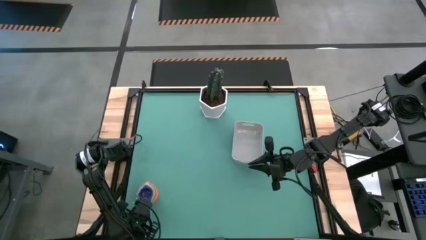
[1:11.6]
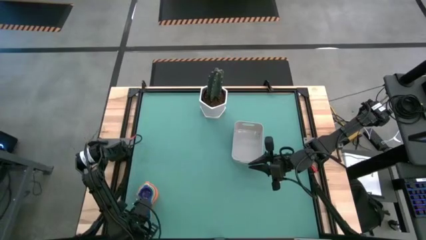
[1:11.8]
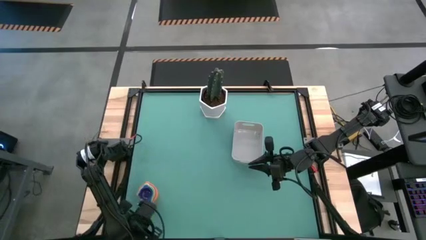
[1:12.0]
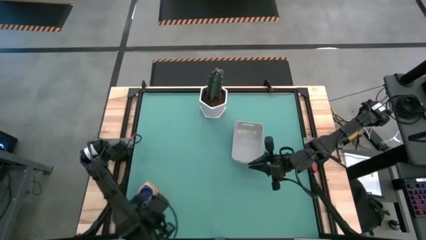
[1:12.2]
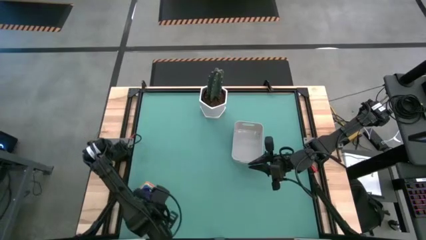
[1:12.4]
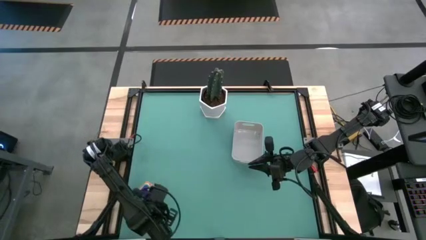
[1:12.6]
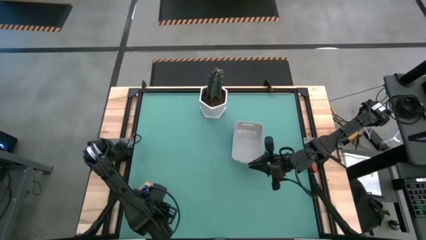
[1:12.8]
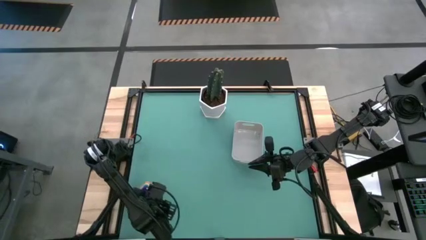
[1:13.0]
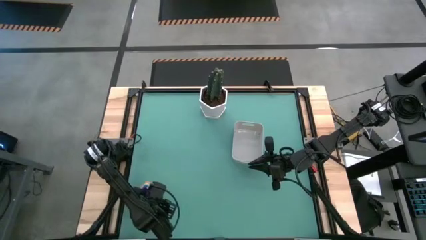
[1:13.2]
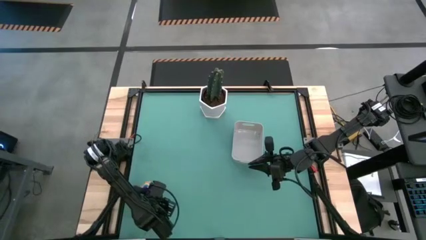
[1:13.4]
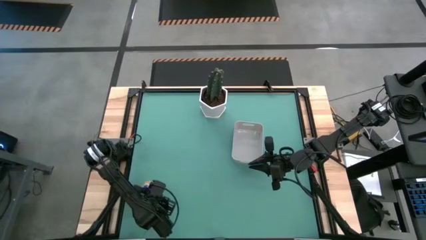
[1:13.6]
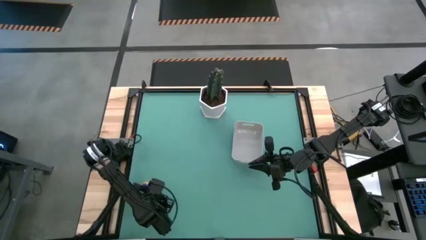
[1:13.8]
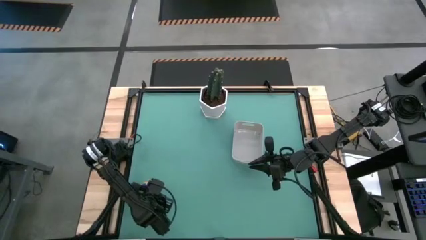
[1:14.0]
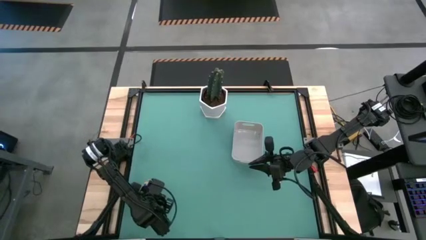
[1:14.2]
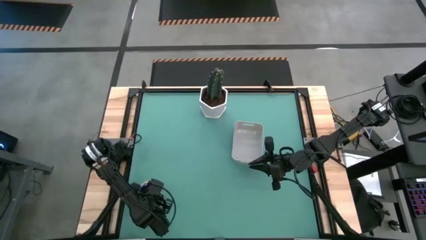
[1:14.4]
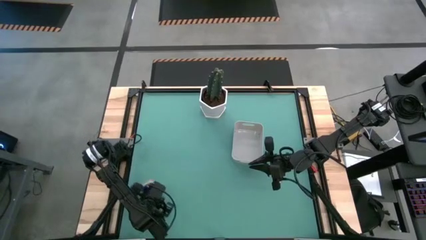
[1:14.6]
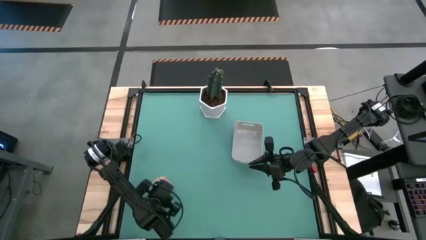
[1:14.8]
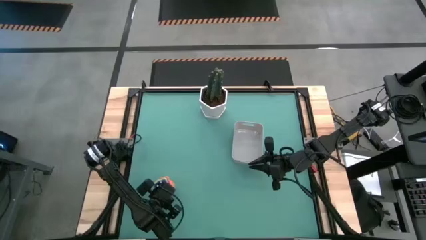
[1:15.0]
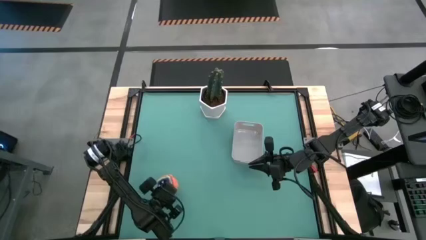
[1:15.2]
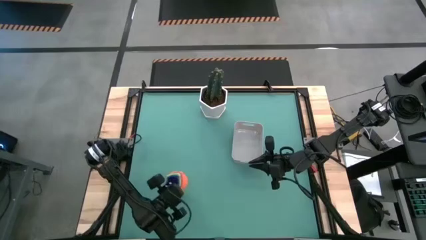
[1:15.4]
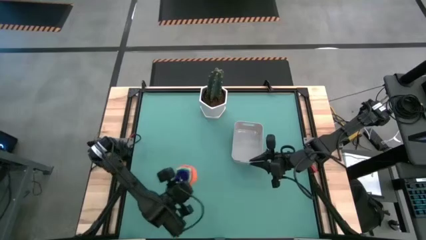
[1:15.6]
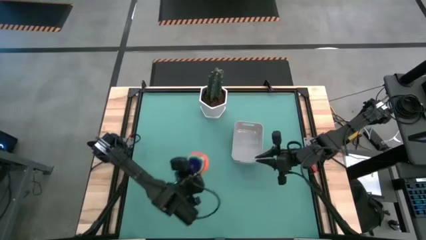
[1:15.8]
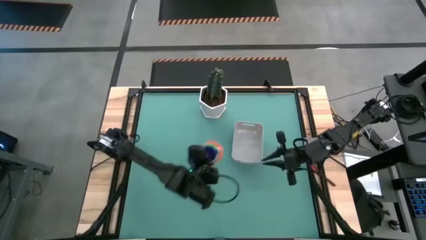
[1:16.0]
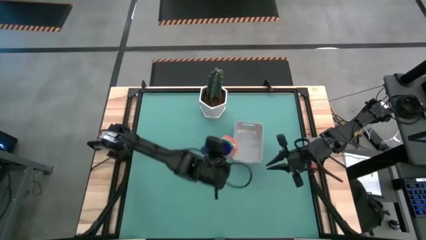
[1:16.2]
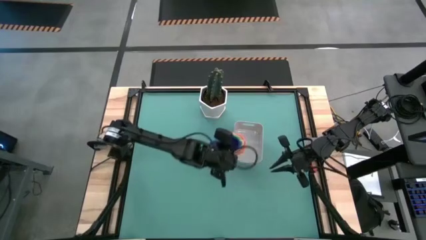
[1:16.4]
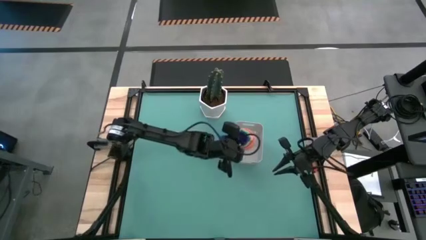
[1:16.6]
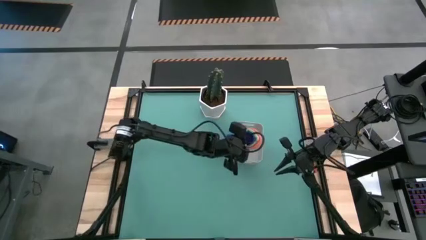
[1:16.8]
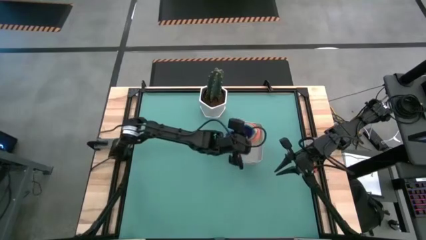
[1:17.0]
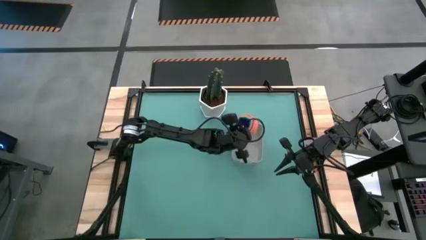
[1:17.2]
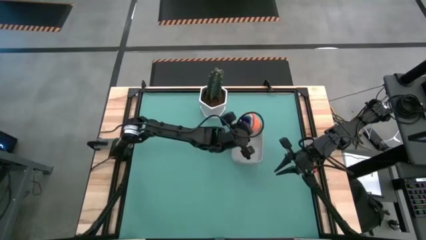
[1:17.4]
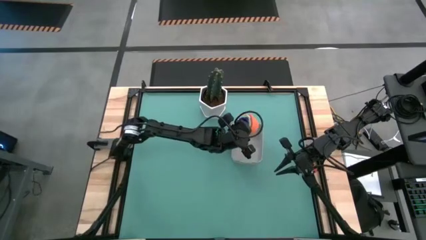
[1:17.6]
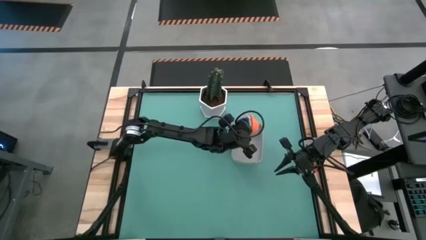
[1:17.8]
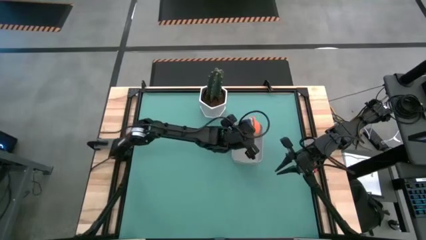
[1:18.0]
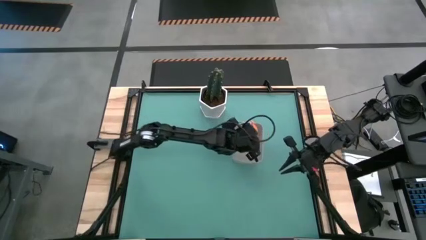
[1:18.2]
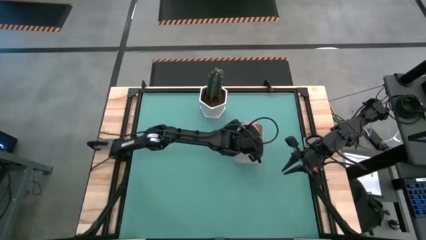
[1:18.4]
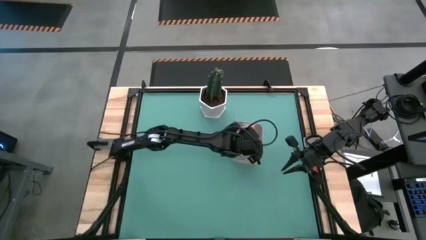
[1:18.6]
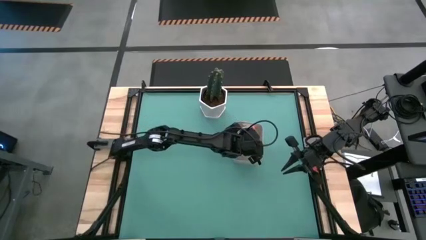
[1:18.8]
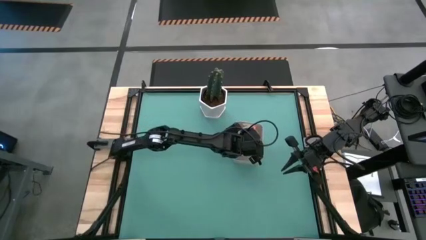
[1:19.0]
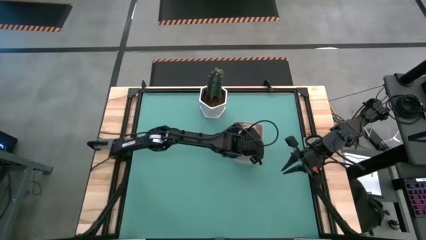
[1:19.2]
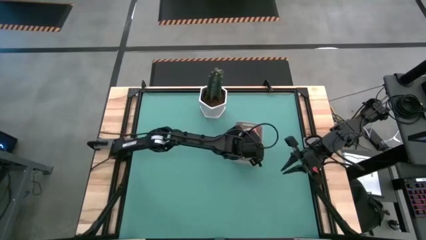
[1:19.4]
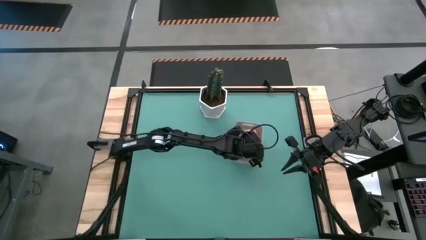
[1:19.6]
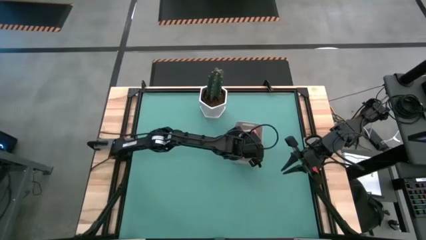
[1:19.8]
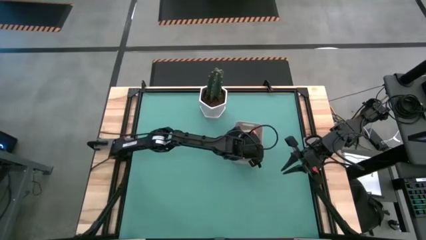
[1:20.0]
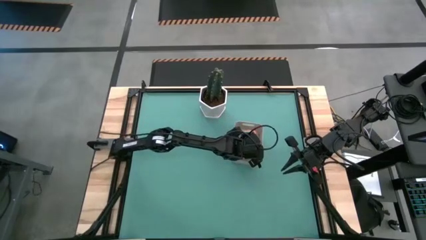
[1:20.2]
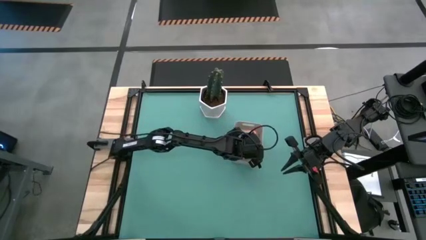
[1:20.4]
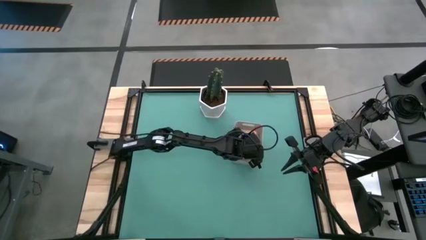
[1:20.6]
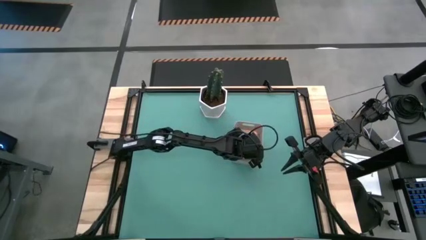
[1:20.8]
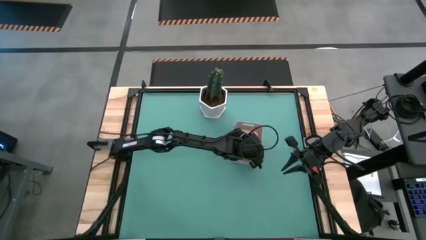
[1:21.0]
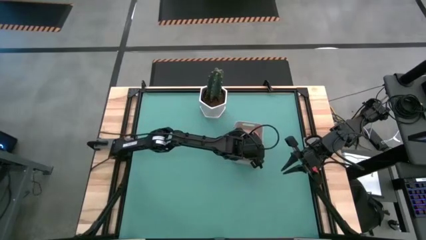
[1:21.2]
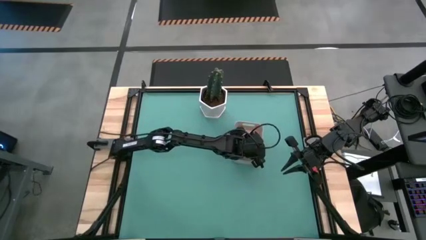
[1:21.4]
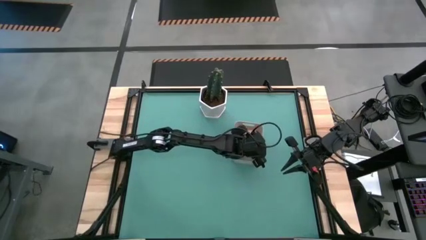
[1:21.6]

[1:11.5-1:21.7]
Task: Nest measuring cups in basket
Put the stacked measuring cups into the gray bin

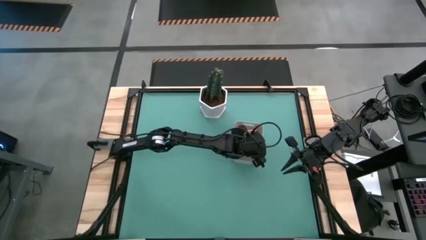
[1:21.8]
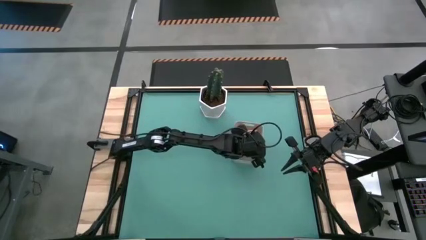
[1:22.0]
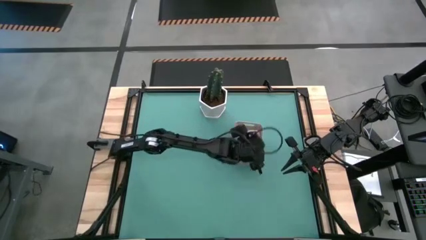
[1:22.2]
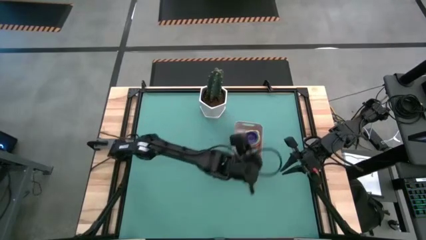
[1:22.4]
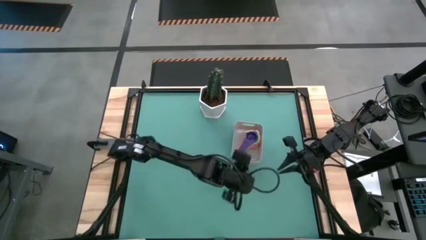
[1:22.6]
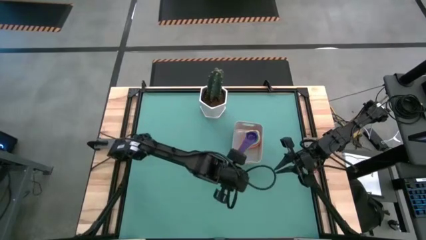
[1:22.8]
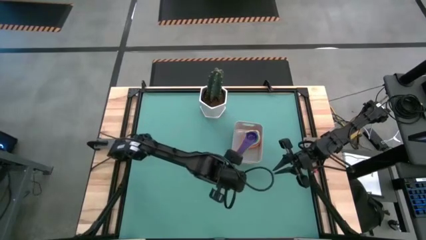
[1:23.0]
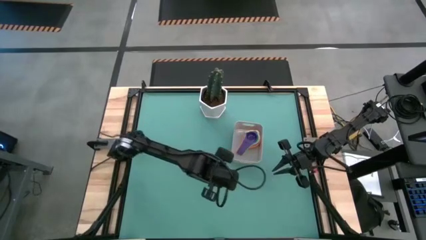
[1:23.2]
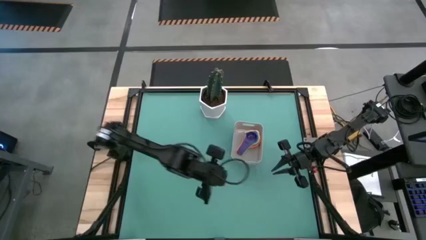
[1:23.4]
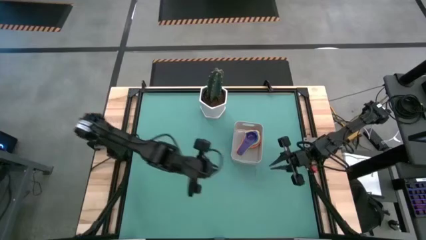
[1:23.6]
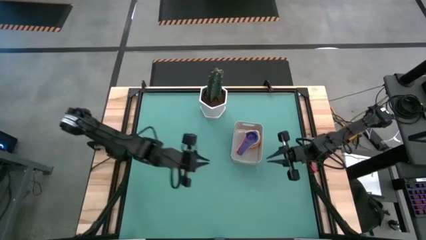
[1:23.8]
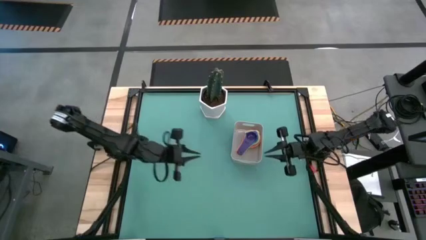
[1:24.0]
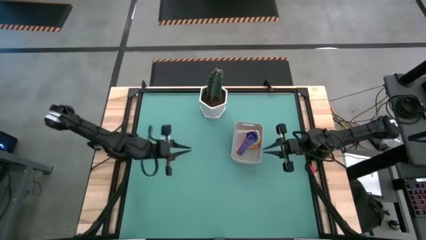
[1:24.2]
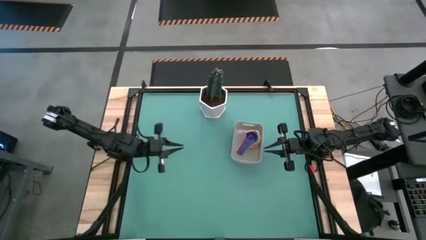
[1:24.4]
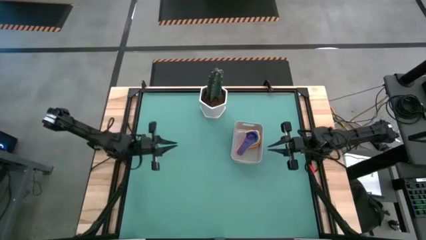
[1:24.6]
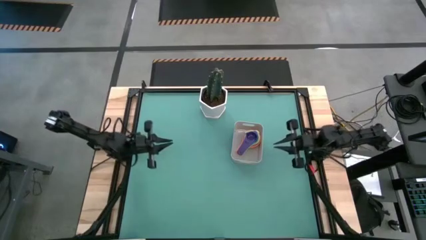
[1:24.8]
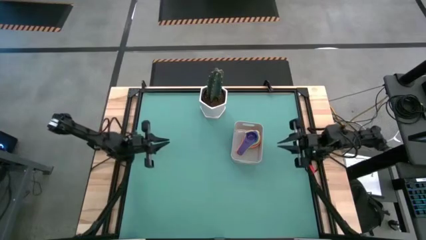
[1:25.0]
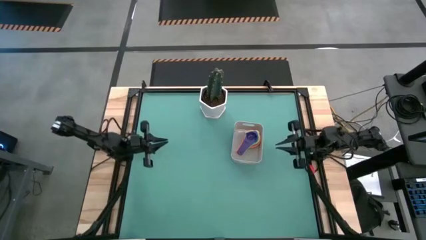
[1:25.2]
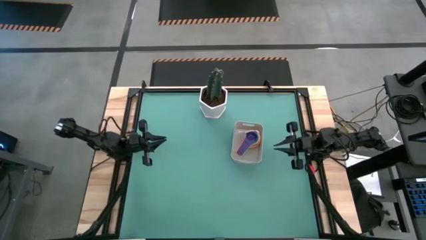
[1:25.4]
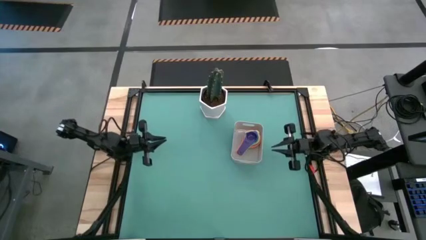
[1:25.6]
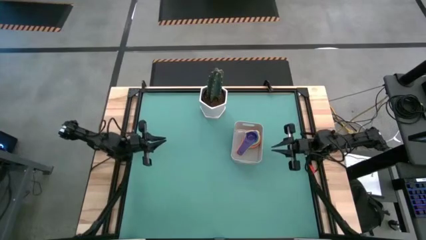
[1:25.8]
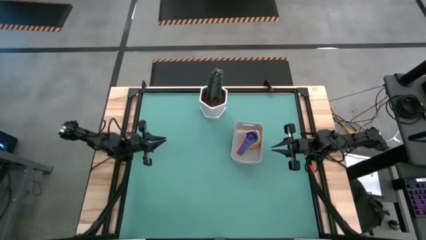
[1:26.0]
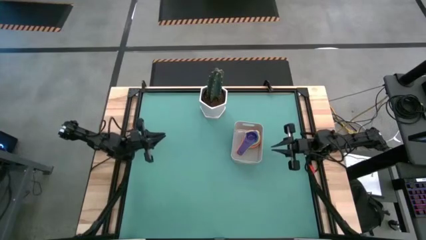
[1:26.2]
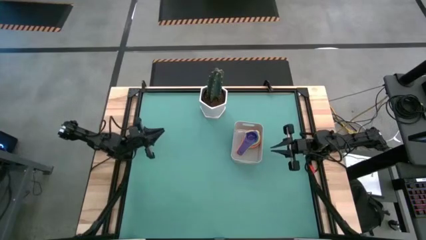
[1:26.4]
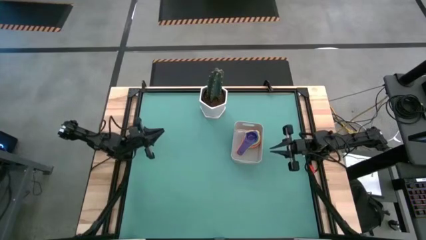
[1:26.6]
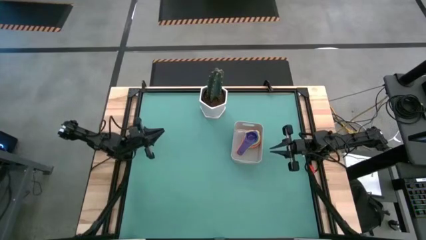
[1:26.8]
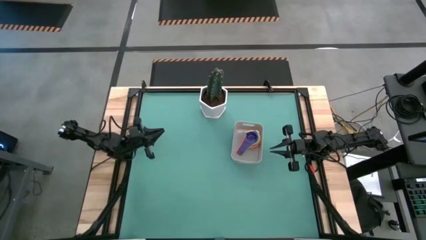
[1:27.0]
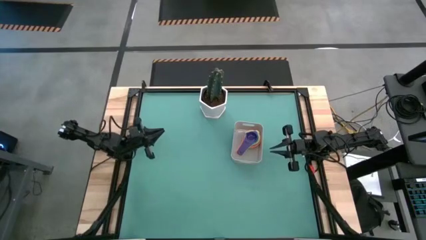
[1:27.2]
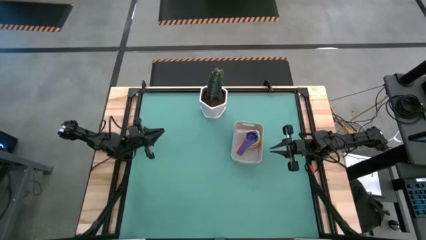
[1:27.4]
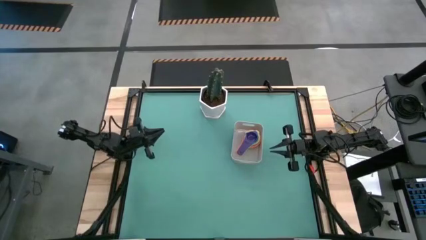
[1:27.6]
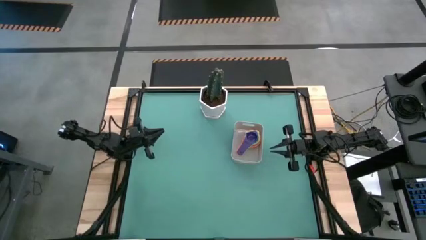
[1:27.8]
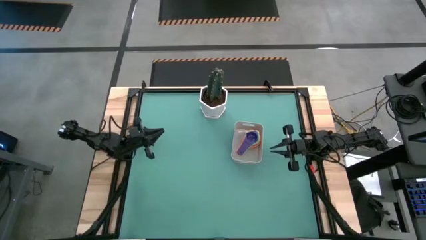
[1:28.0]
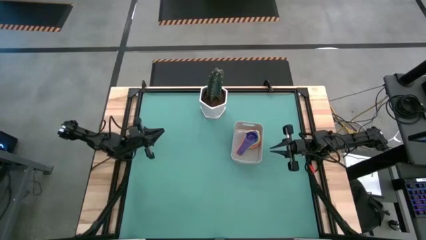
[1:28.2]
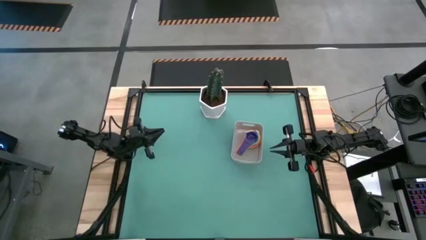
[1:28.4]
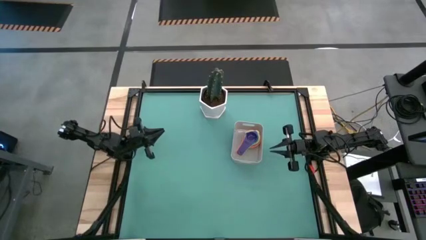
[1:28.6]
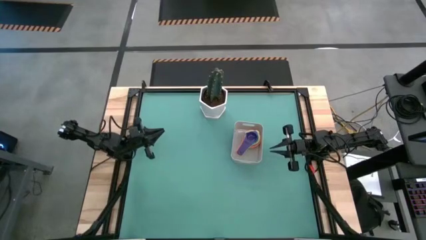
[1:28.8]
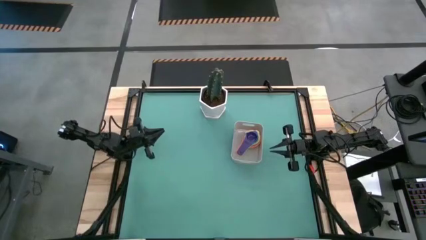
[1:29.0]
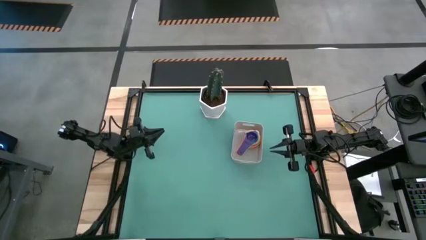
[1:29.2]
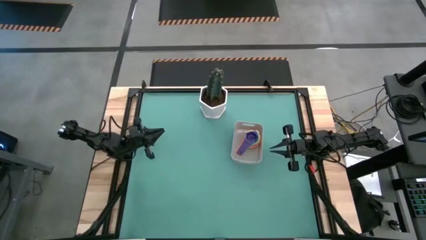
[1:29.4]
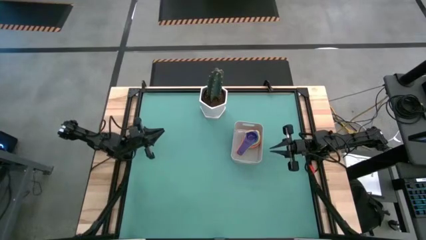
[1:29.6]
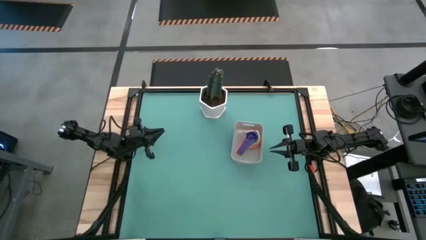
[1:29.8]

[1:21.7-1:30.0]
Return to Home Position
